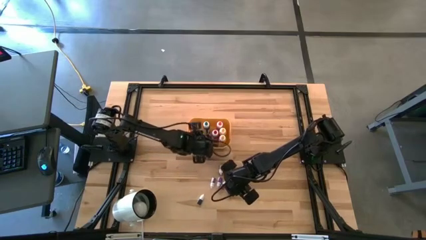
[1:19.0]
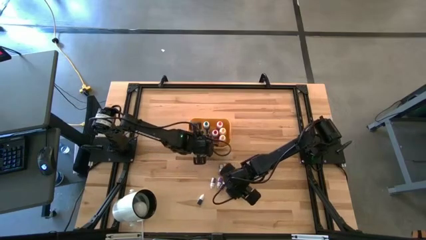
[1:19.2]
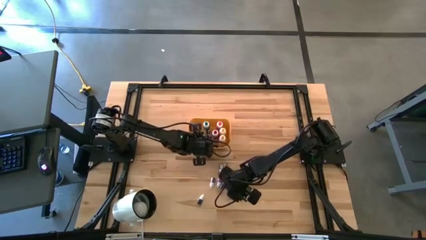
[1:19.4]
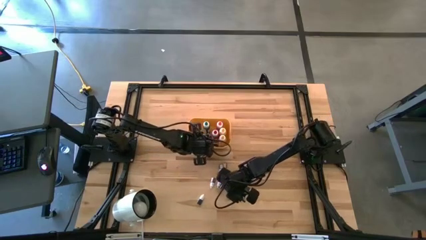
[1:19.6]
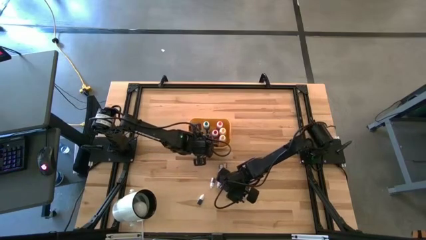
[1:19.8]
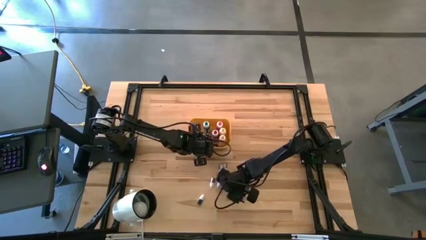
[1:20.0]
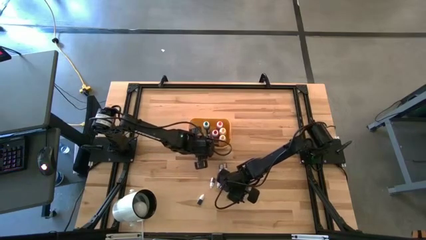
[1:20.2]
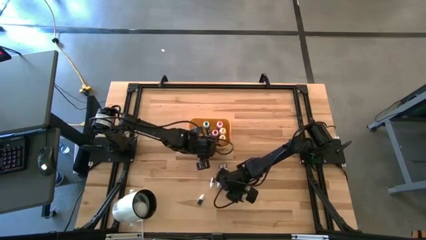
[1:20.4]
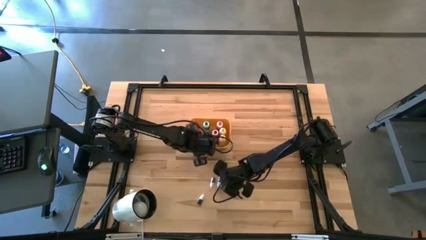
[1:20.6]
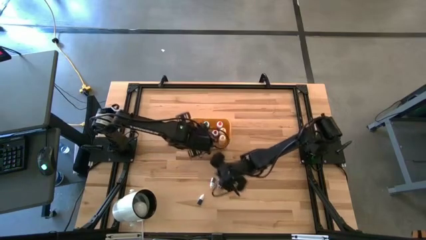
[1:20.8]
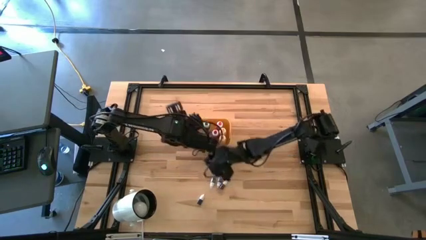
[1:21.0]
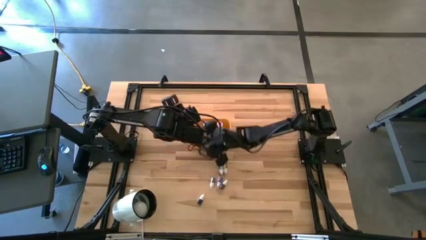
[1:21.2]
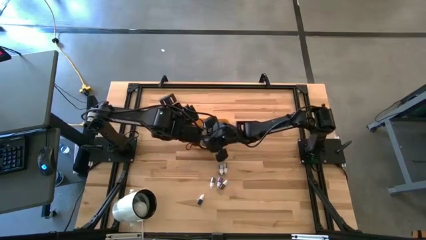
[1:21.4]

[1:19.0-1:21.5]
Task: Pick & Place food coloring
Put the small blue food coloring bottle into the yellow bin

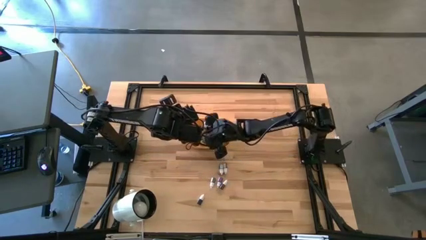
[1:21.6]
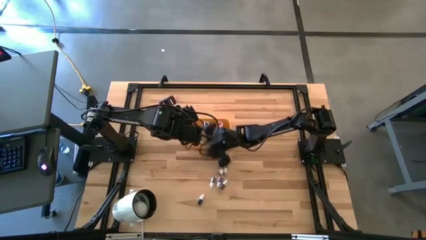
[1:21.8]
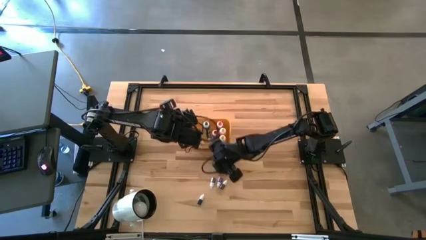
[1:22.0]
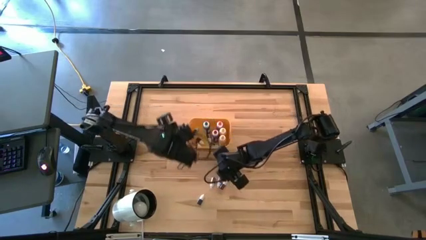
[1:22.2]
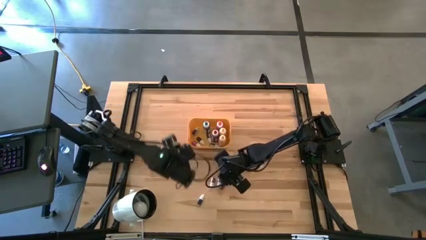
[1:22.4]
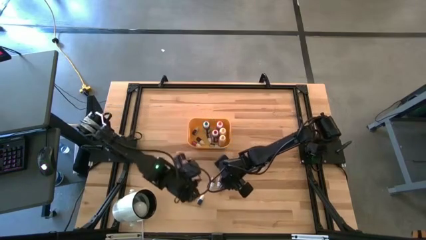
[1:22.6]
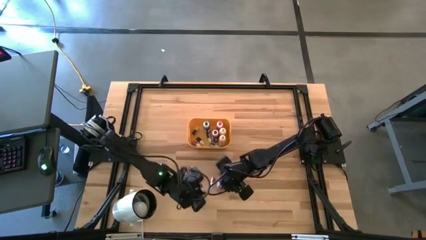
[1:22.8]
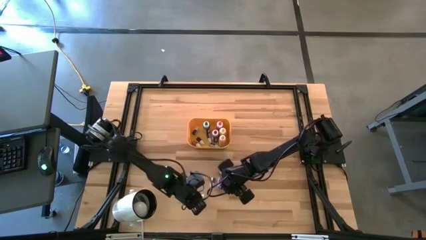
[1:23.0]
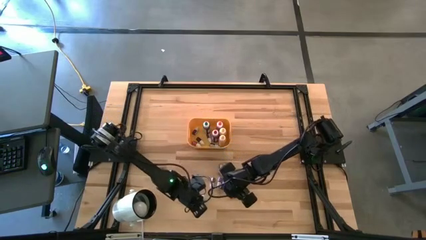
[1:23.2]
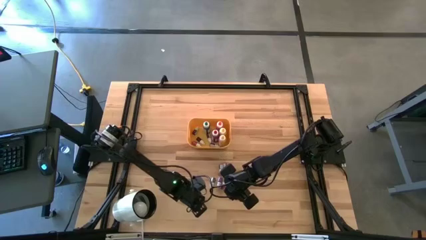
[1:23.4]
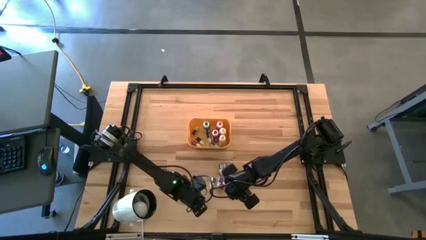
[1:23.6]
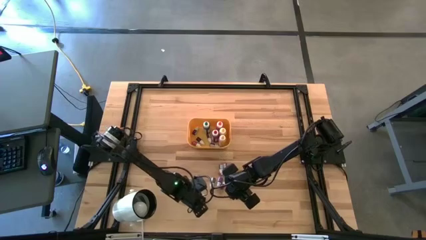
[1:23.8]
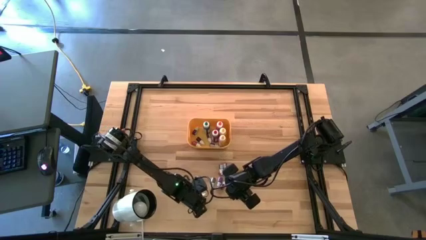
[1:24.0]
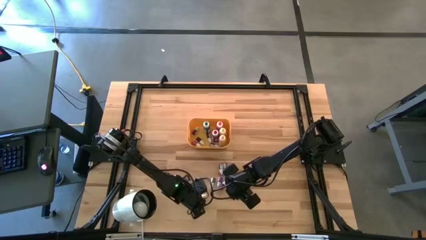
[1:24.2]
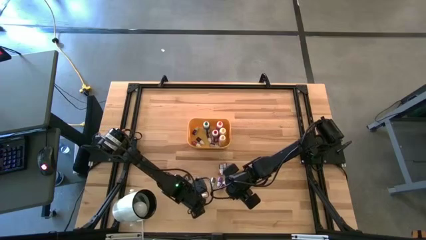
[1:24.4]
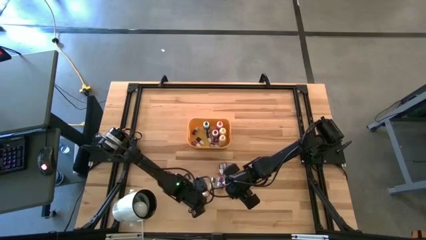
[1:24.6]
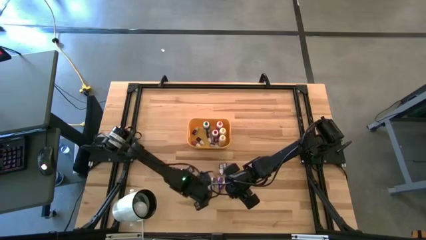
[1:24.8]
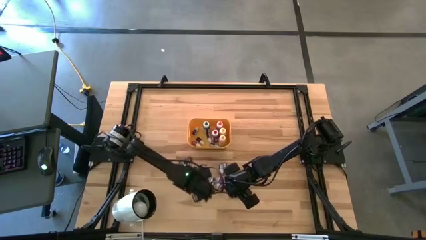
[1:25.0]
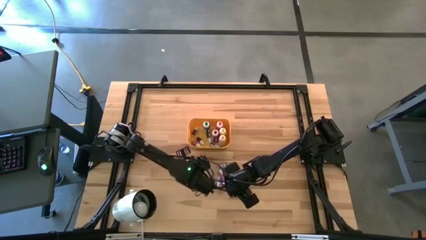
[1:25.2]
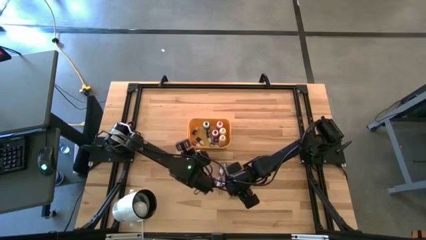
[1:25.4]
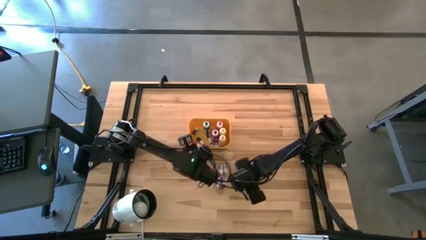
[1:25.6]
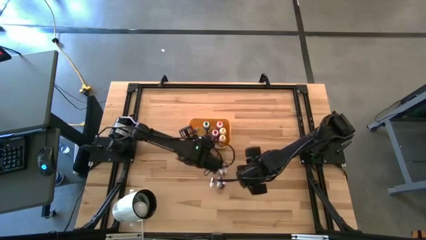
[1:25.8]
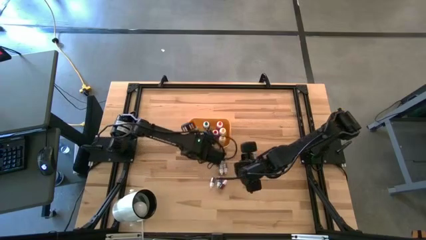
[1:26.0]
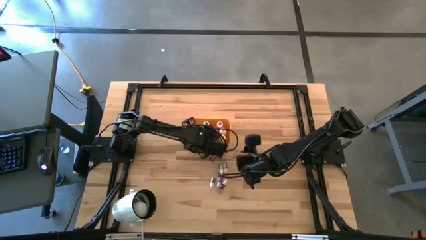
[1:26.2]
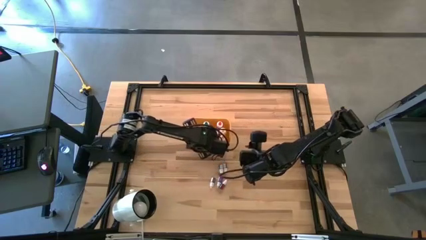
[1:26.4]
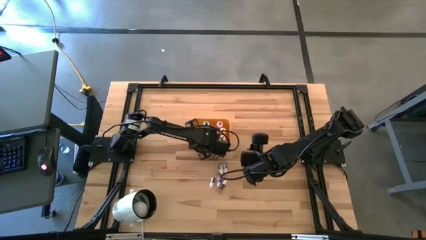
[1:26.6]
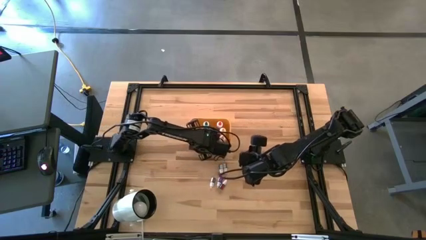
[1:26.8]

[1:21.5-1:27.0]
Put the small green food coloring bottle into the yellow bin

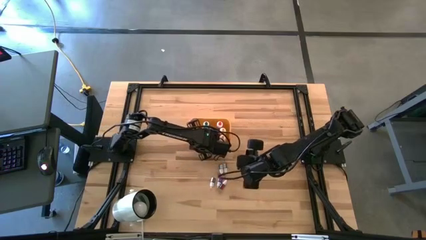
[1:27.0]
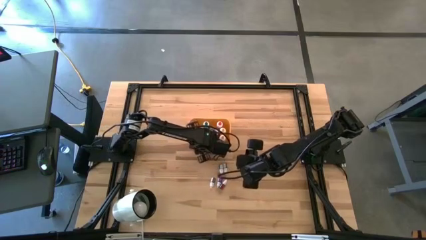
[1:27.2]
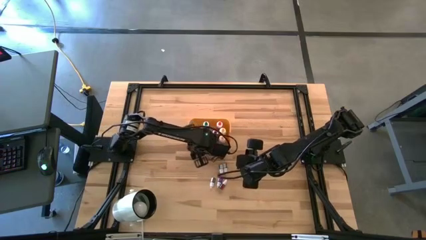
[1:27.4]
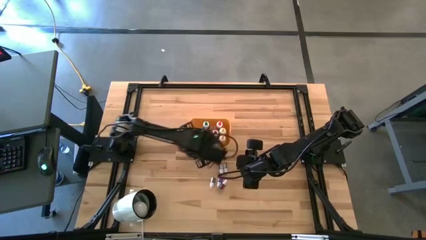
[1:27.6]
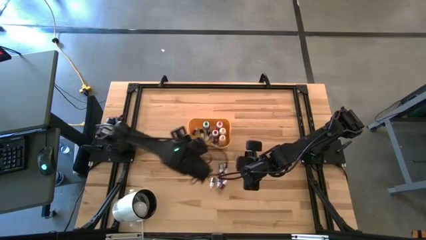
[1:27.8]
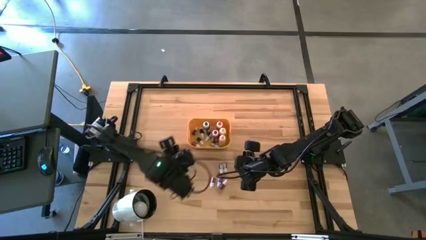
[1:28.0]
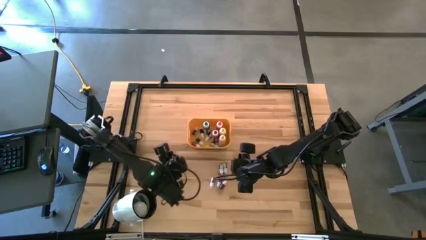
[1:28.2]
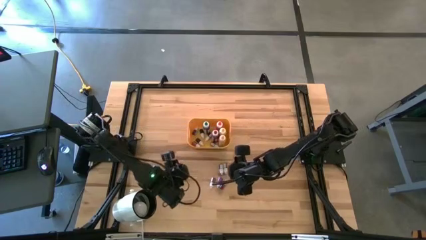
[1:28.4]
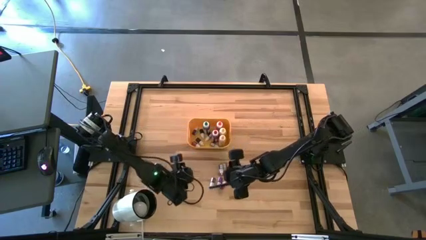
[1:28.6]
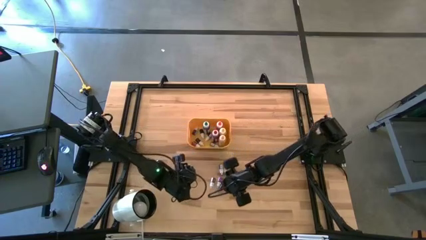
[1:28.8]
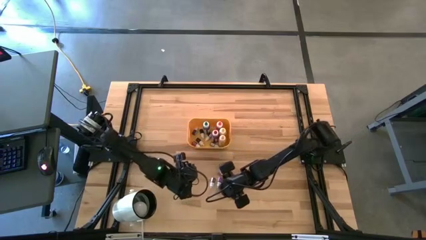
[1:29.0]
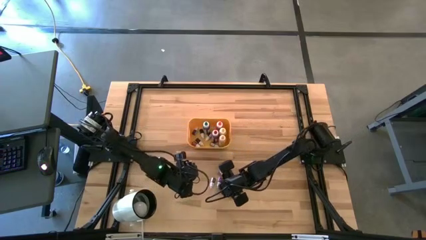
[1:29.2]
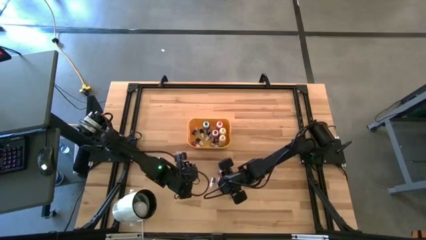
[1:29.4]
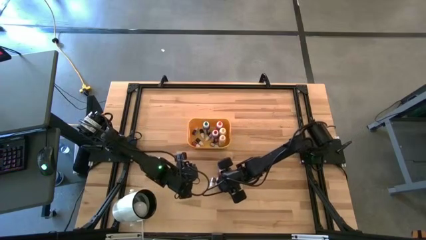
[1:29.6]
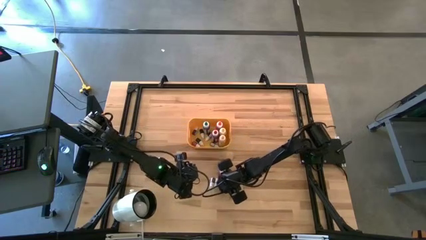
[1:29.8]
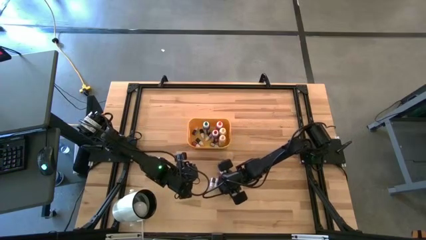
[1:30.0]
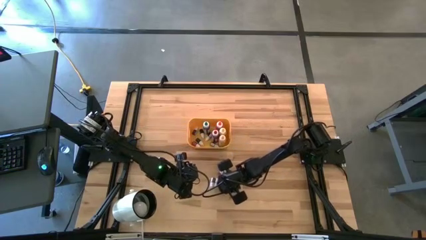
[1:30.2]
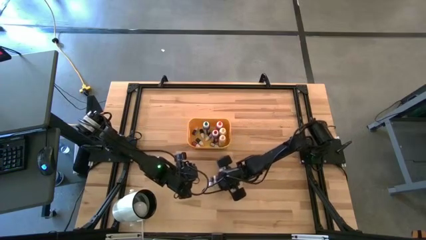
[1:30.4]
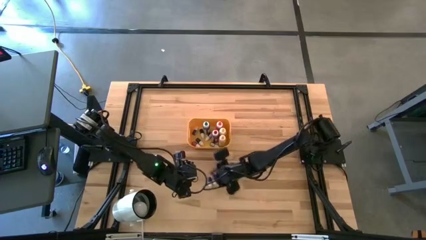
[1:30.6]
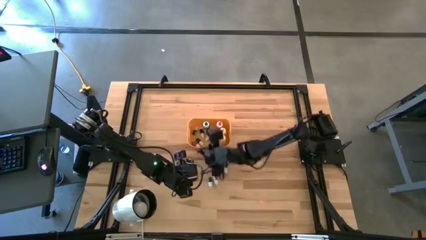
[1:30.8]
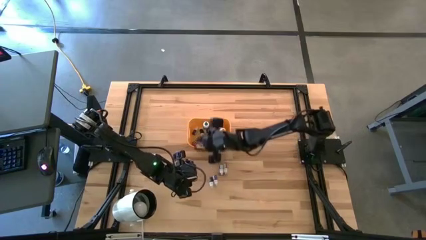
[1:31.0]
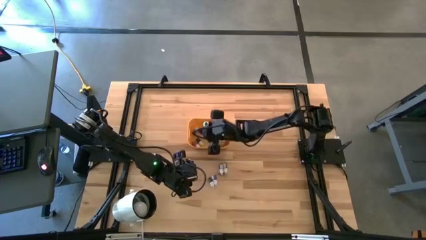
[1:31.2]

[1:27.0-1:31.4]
Put the small red food coloring bottle into the yellow bin

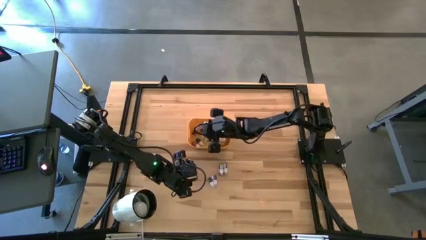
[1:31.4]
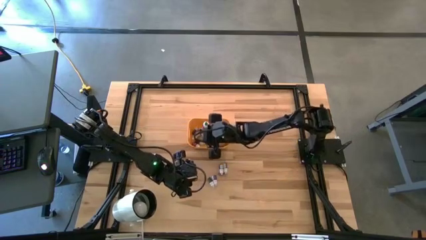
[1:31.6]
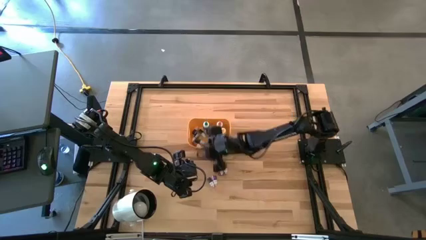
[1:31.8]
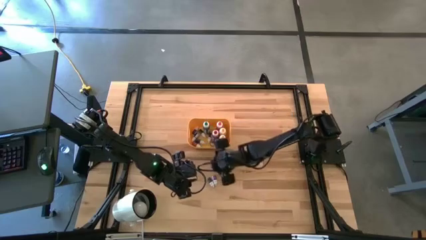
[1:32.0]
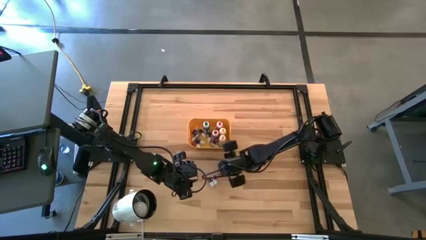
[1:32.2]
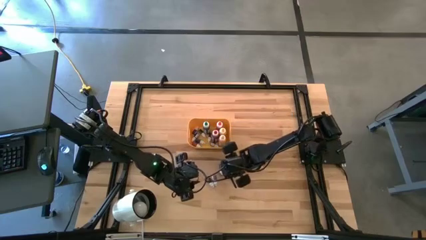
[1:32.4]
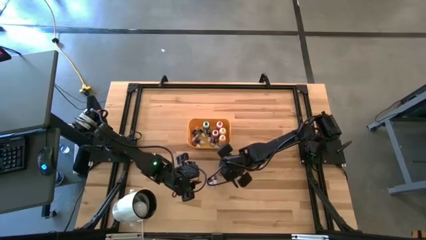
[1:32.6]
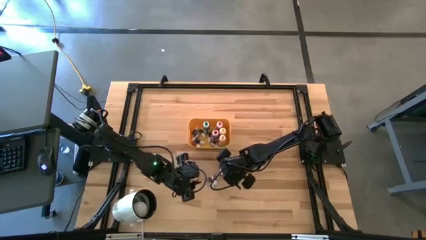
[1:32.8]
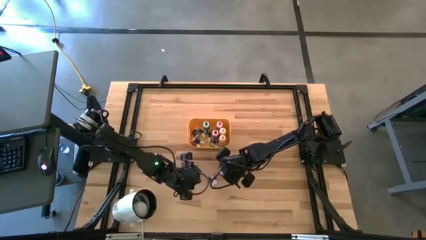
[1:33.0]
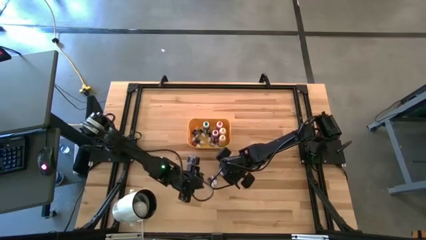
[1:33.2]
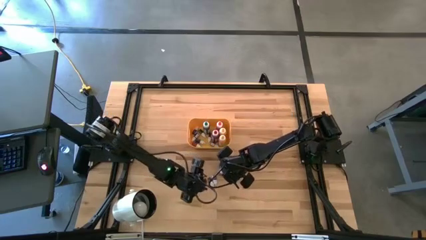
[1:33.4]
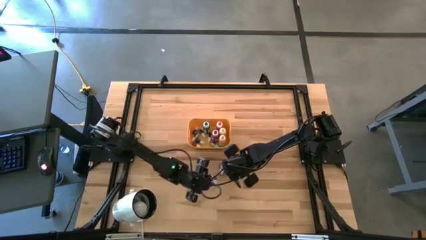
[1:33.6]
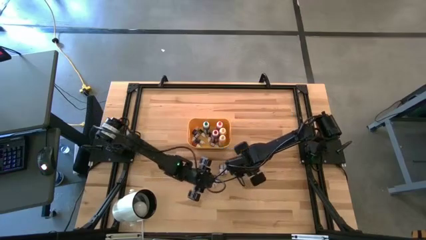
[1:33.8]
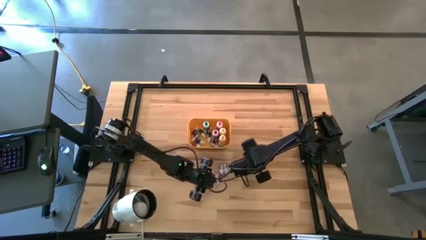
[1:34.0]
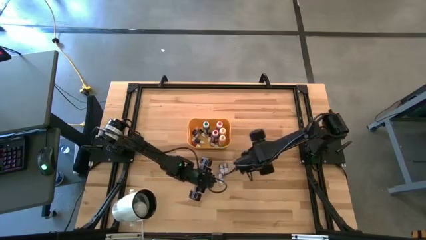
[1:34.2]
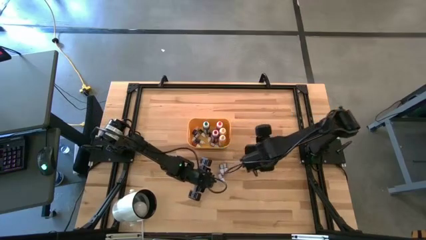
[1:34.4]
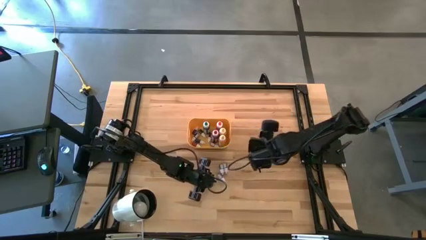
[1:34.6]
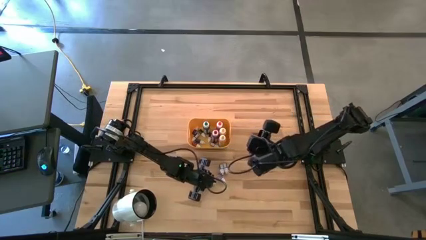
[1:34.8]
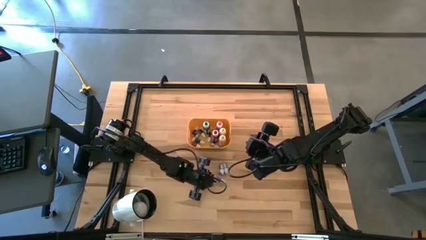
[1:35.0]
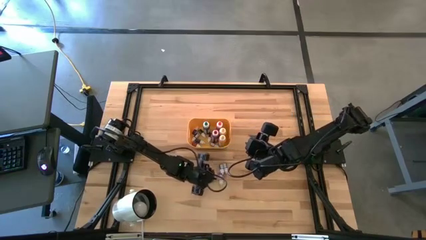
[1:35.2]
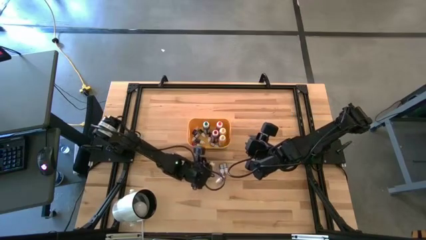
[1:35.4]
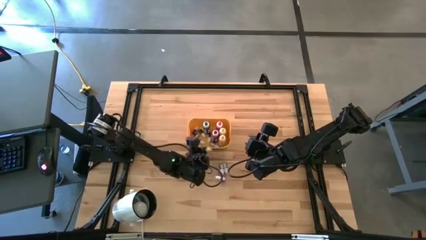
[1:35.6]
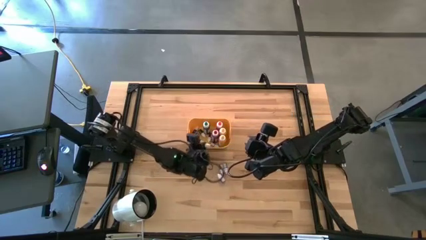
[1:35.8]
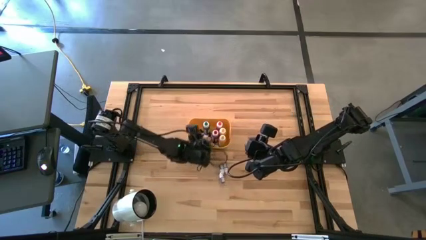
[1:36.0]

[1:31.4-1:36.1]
Put the small green food coloring bottle into the yellow bin
